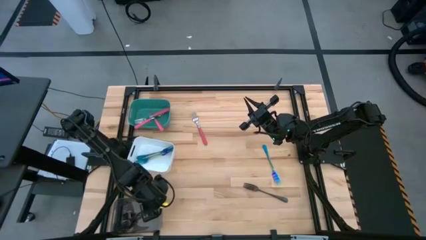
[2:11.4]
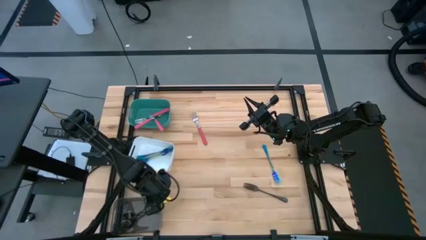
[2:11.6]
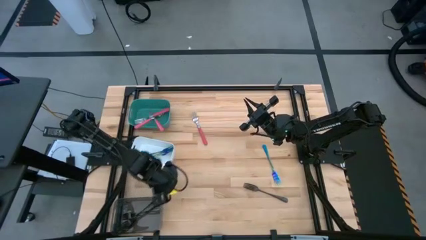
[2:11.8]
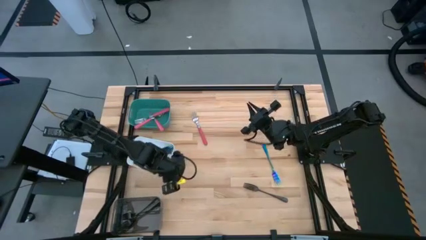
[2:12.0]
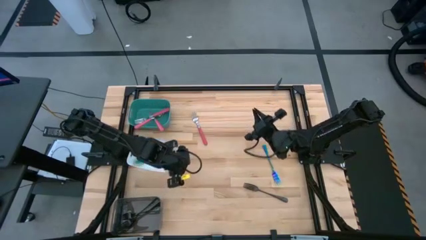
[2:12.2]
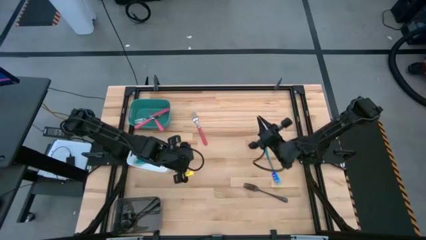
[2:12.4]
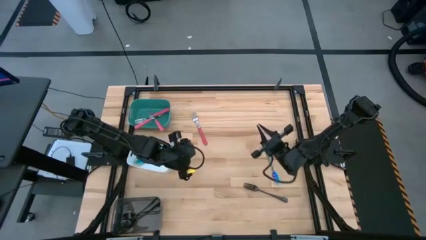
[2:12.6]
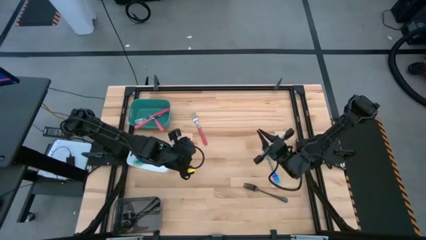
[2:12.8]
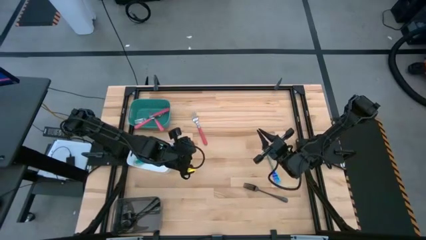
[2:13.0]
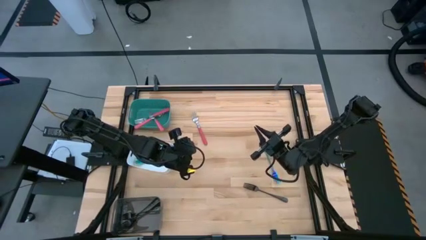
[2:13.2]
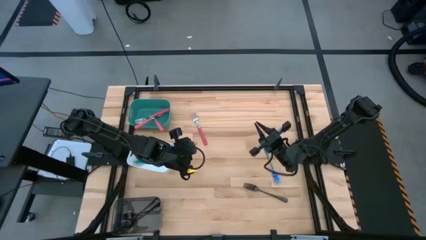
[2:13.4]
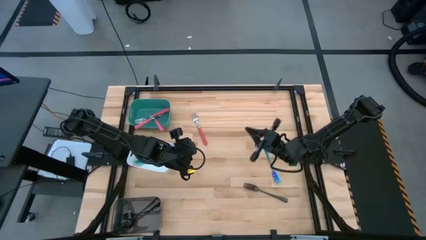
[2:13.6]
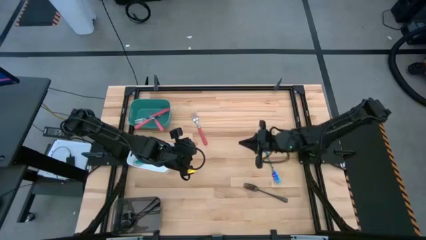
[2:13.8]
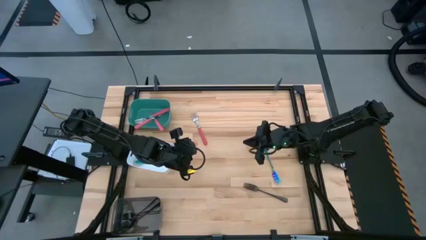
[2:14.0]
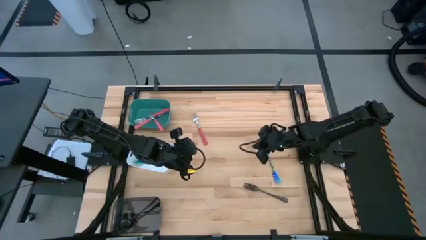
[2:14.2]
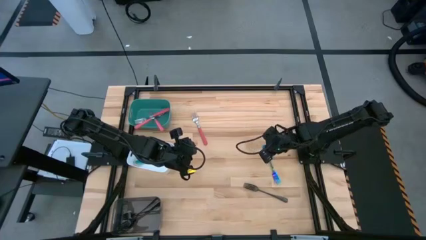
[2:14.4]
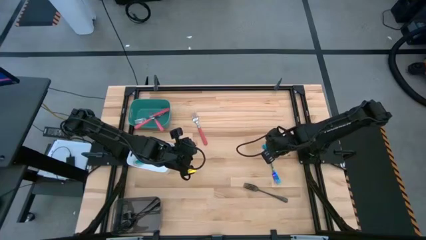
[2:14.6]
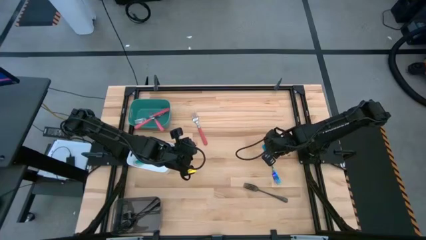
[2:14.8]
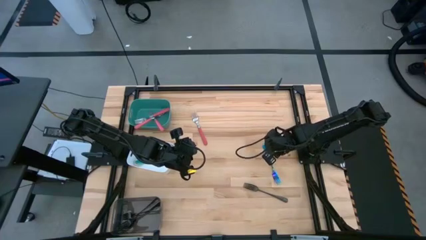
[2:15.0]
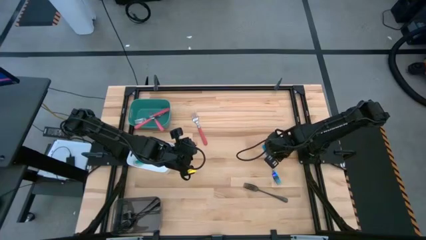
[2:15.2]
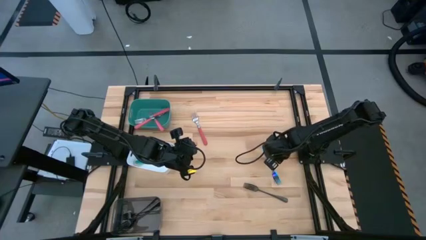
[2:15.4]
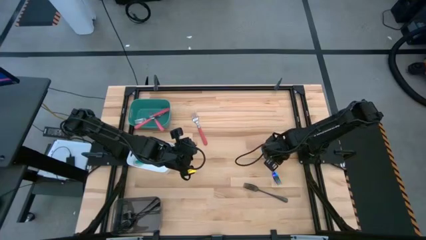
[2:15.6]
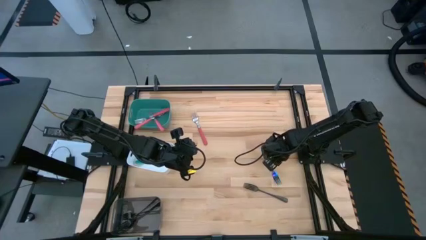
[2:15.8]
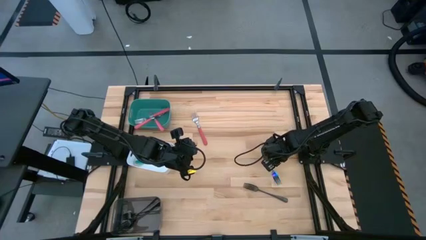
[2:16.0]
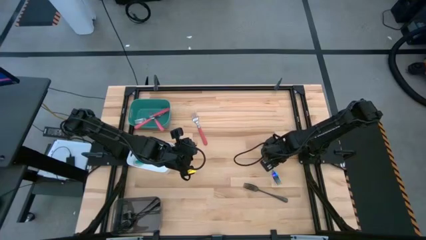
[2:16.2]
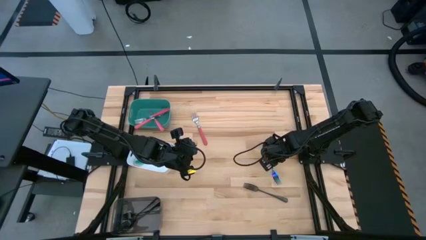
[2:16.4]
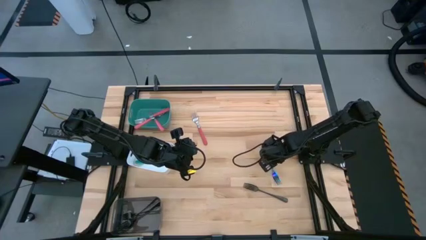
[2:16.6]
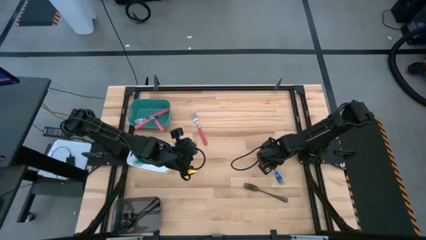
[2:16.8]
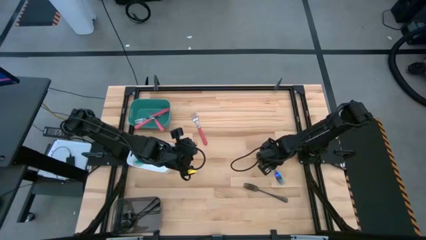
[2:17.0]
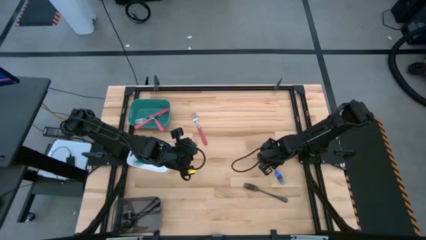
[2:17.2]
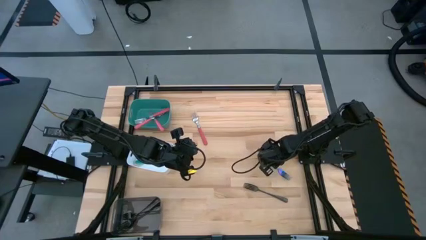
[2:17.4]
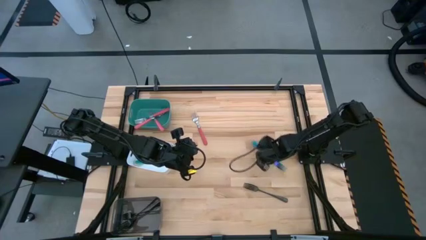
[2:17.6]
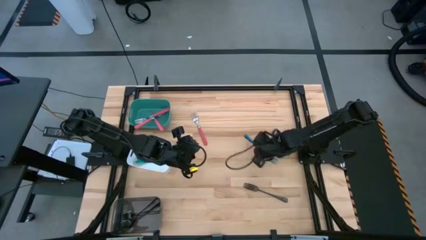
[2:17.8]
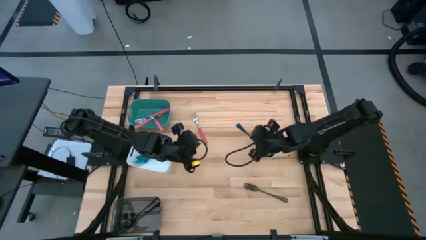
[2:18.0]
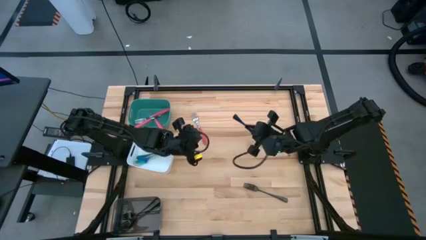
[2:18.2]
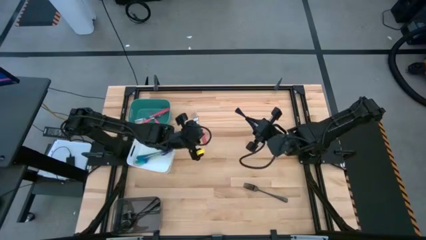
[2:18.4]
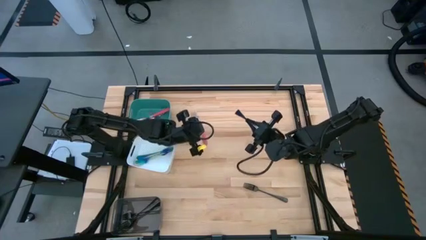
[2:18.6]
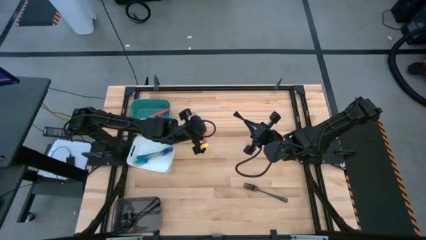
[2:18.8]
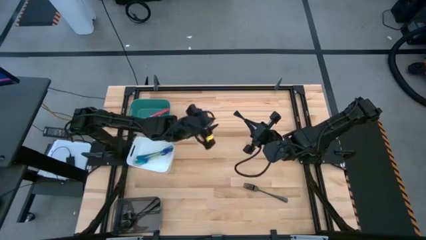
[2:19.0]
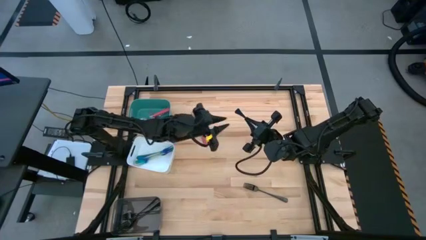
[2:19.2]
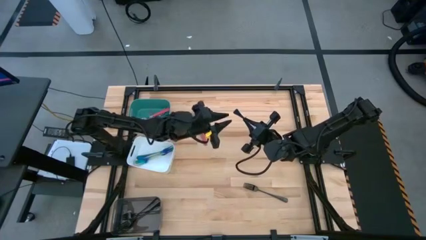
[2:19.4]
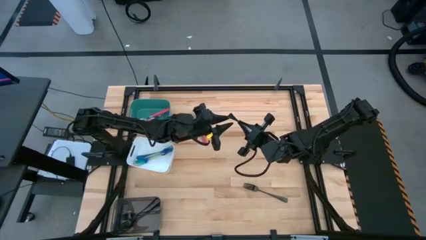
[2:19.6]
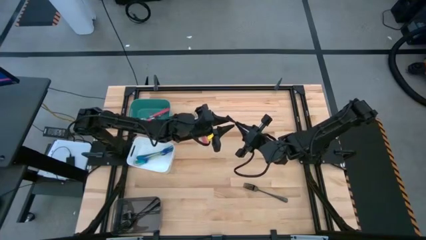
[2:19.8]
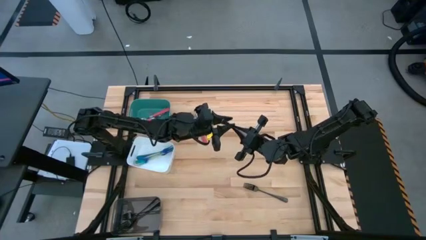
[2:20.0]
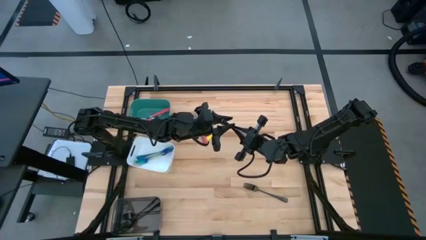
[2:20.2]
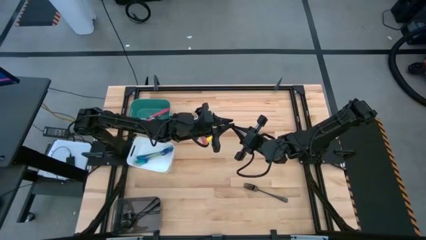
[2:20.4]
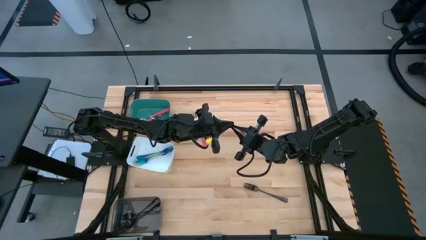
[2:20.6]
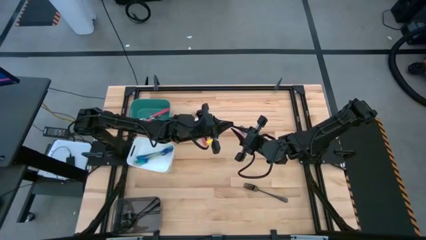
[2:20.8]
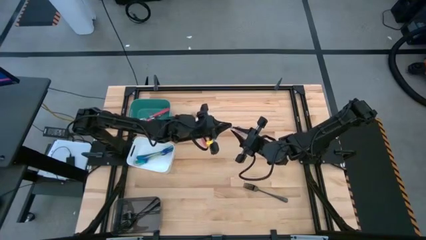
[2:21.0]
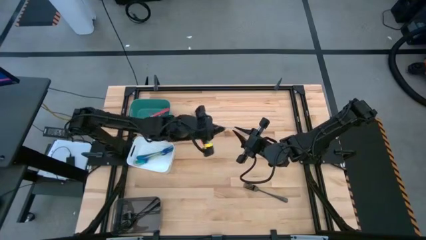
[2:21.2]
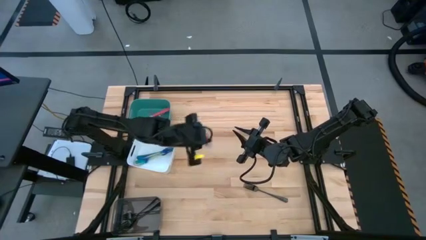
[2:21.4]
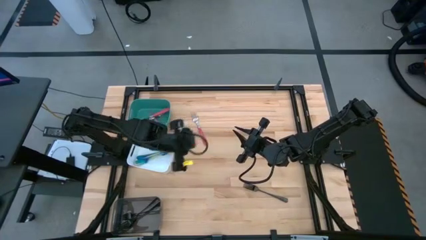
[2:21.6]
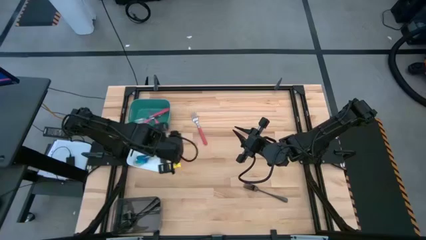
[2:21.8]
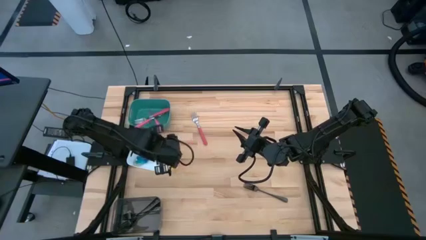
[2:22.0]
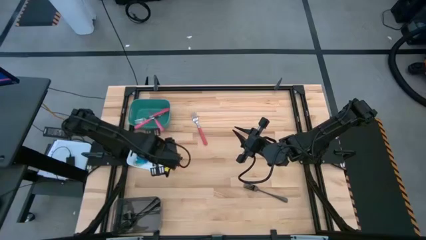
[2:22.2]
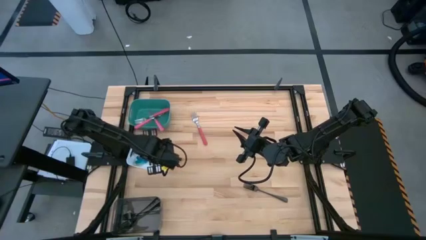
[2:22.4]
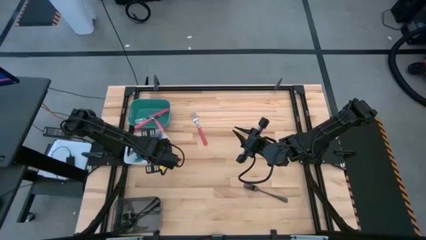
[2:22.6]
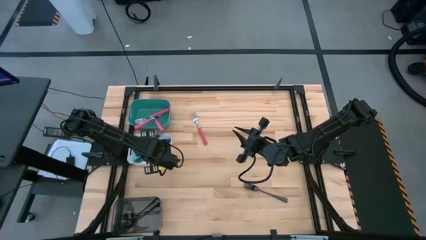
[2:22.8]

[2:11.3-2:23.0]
Task: Sort silverware by color (type)
Put the blue fork into the white bin

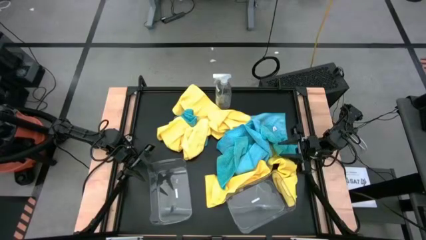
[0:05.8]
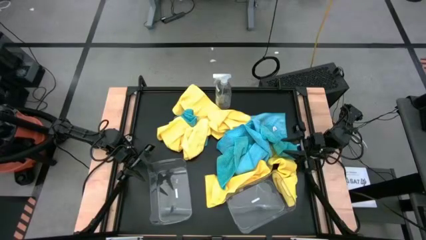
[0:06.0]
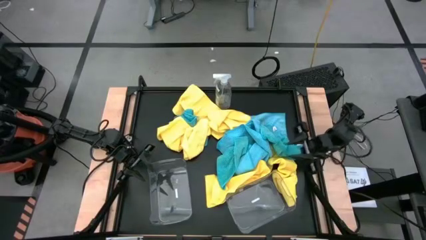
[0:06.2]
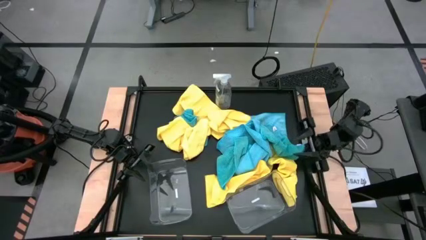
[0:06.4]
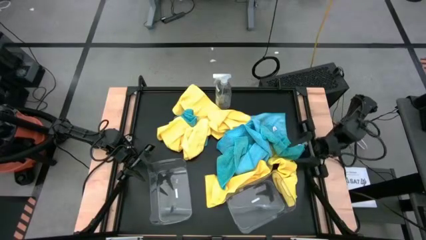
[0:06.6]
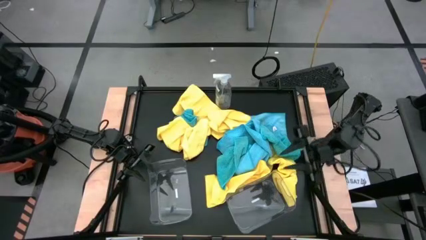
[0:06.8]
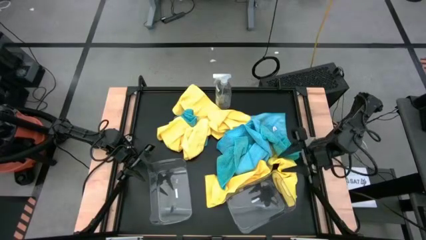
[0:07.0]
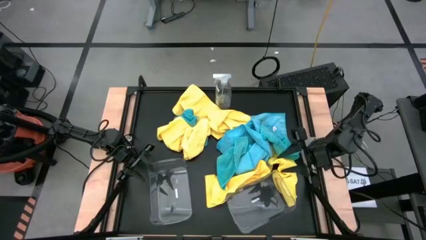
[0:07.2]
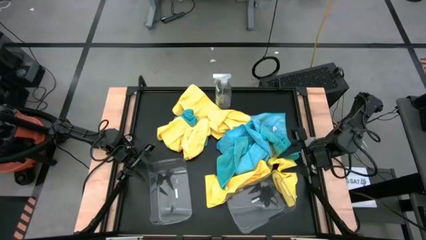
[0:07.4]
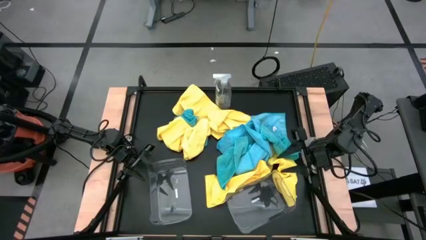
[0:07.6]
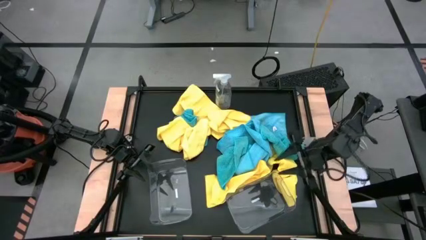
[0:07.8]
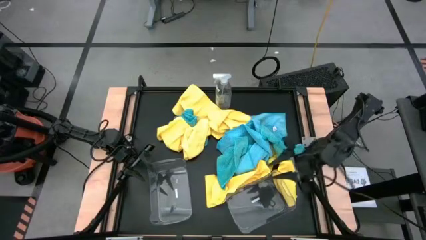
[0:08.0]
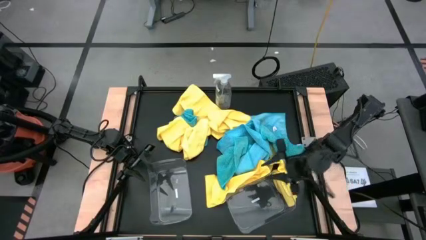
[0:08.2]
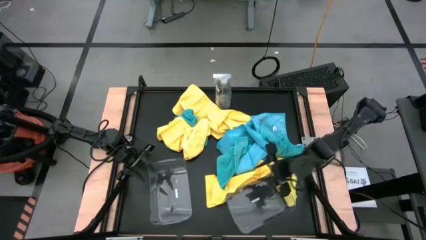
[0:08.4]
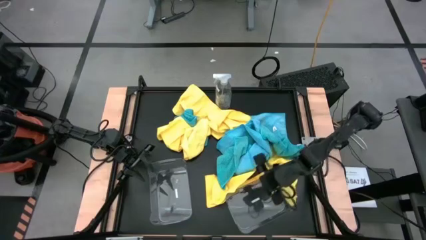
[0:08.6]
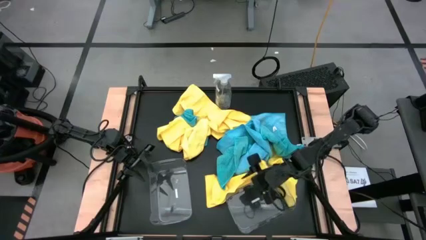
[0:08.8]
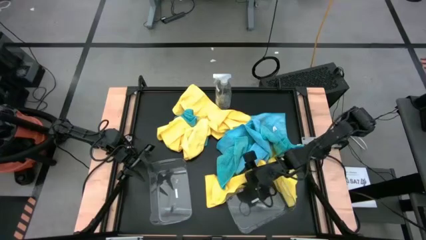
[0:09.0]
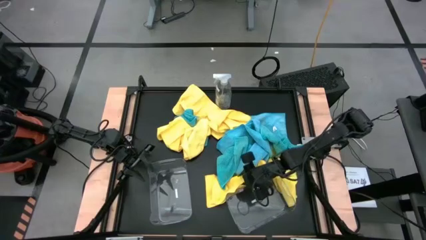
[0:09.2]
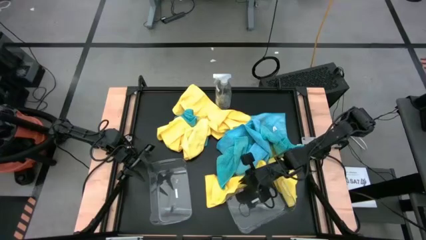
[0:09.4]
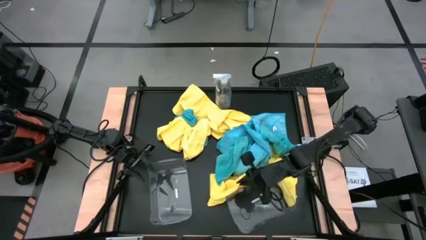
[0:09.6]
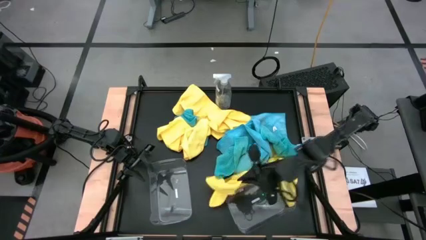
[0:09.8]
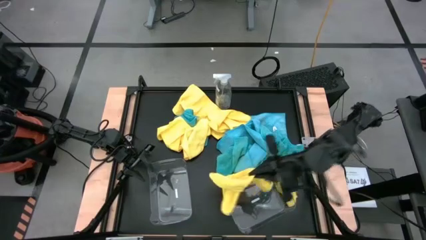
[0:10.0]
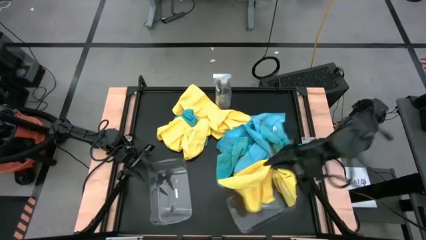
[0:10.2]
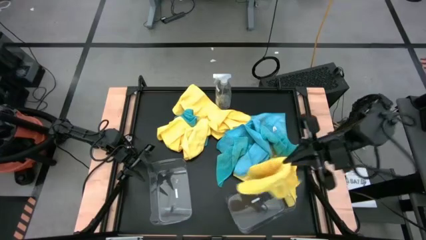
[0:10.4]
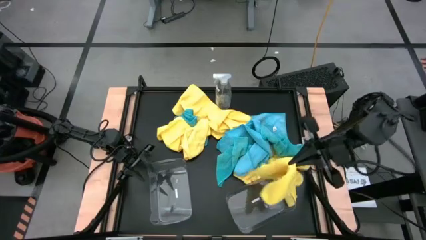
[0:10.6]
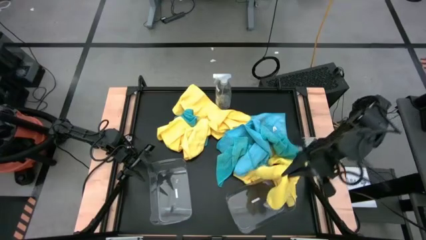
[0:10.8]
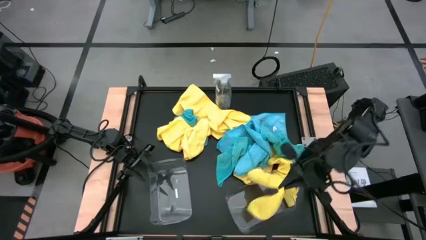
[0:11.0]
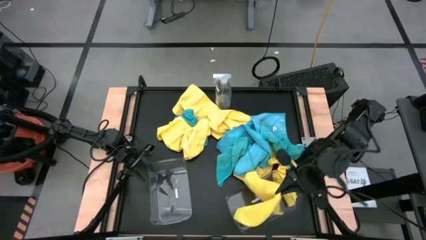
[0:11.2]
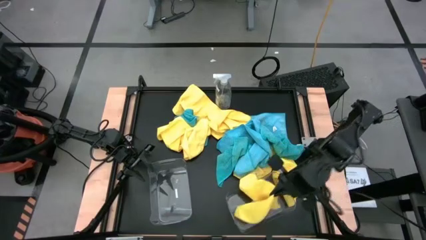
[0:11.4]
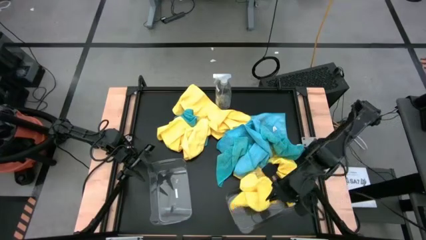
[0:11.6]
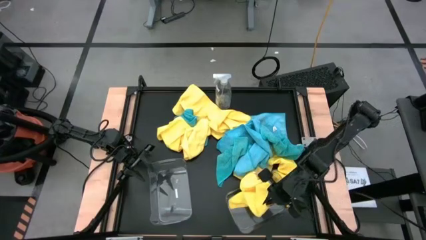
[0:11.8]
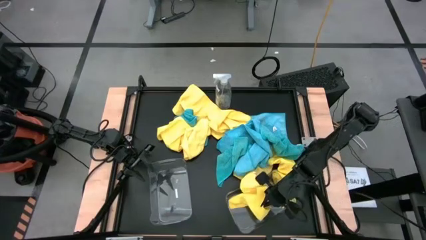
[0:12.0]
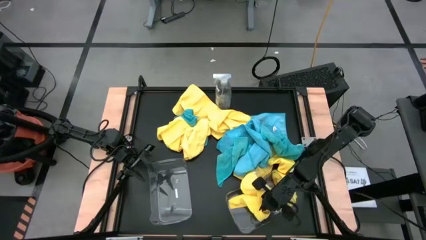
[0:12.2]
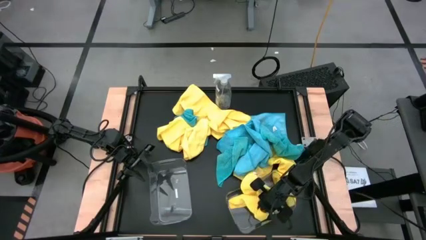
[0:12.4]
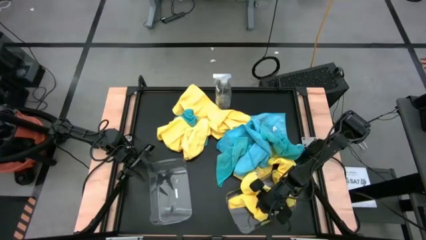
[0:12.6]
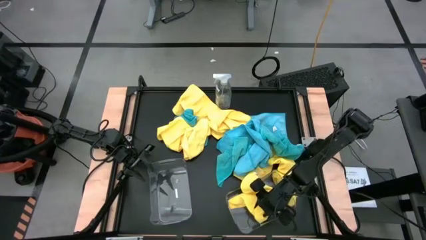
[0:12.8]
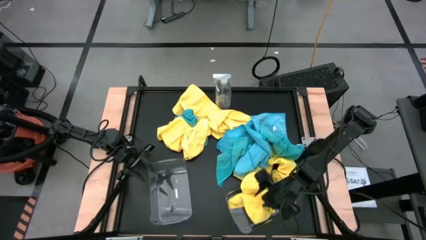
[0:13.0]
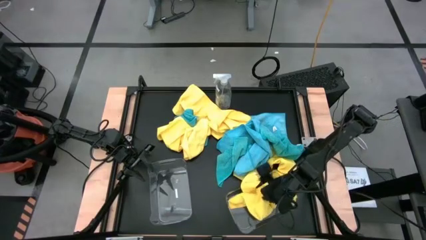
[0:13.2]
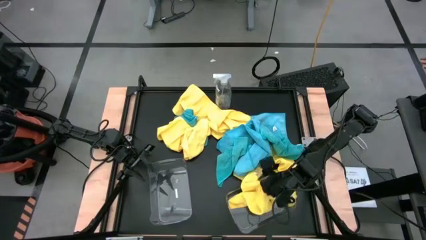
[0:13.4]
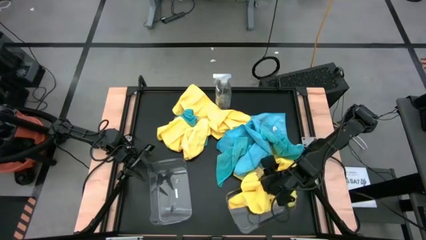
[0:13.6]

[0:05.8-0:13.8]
Task: Sort microfiber towel by color & place in baskets
Put the yellow microfiber towel into the right transparent bin
